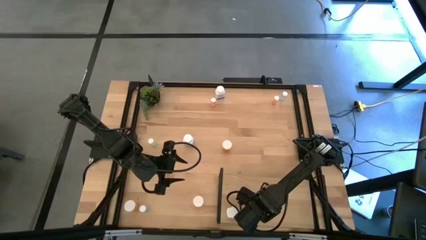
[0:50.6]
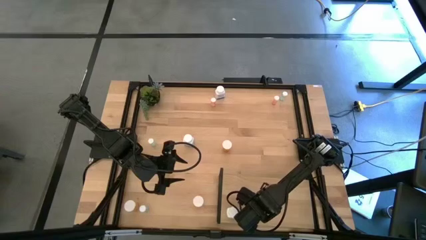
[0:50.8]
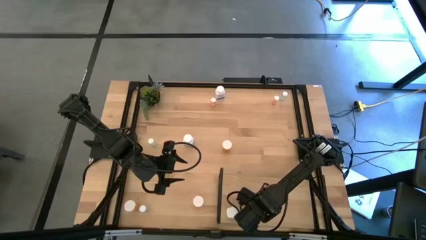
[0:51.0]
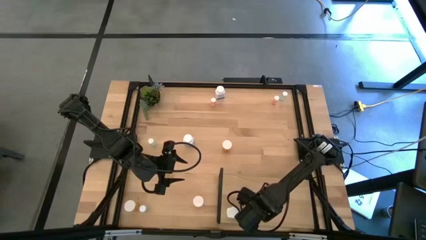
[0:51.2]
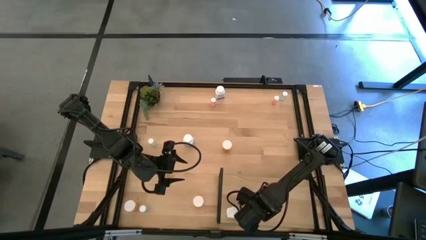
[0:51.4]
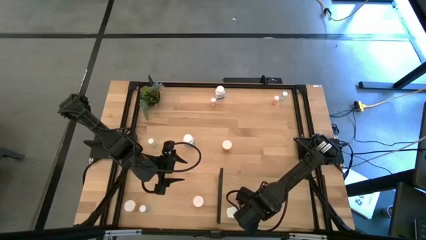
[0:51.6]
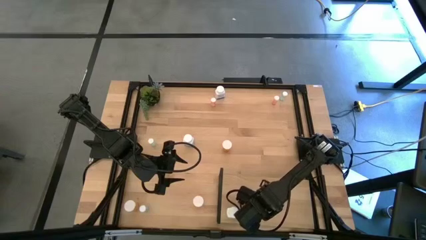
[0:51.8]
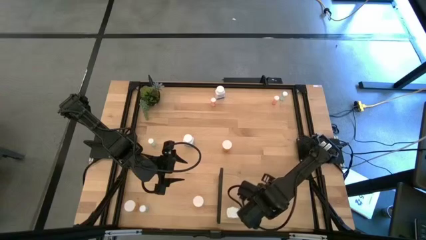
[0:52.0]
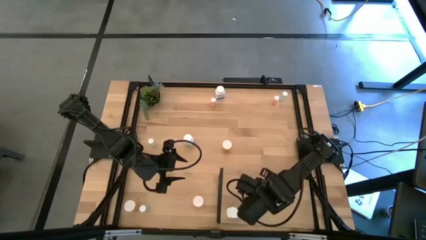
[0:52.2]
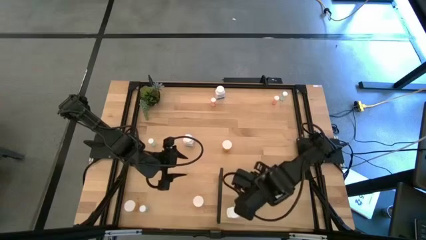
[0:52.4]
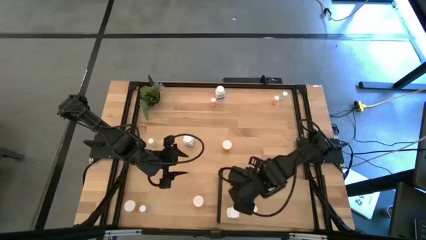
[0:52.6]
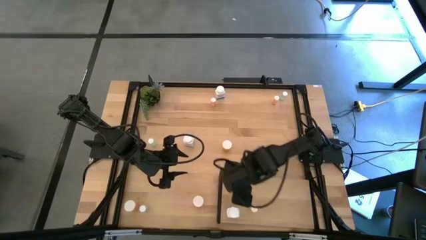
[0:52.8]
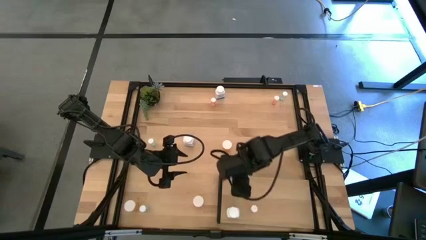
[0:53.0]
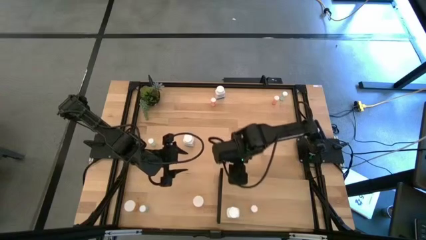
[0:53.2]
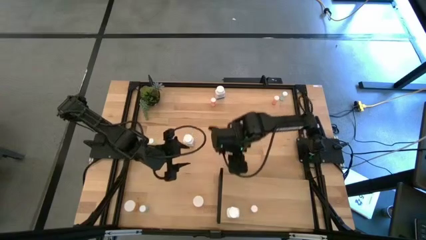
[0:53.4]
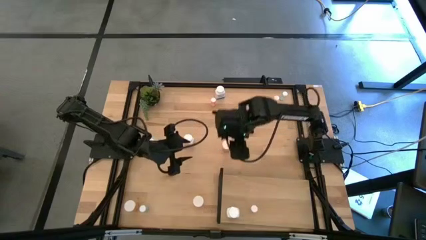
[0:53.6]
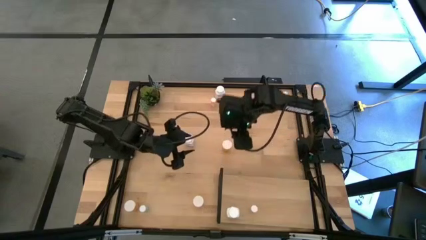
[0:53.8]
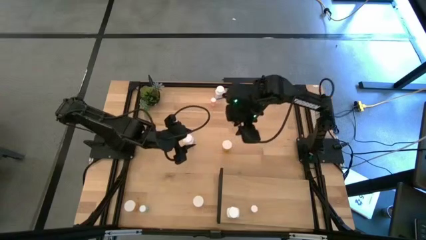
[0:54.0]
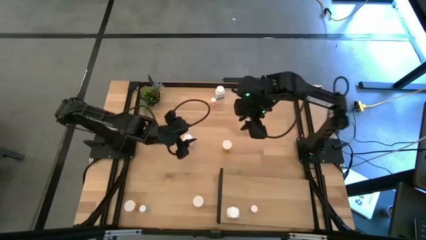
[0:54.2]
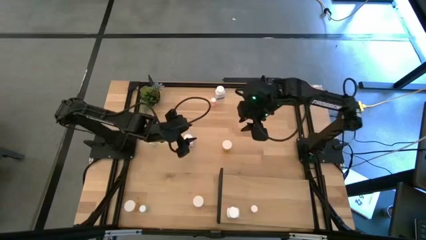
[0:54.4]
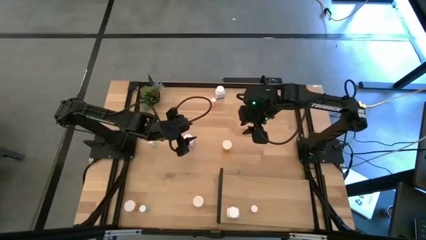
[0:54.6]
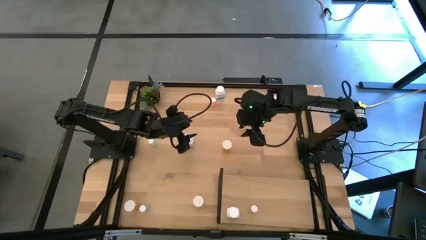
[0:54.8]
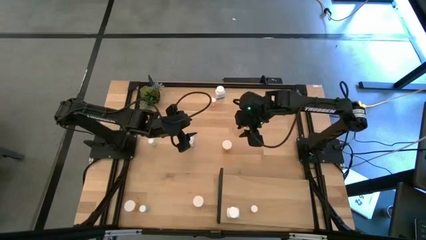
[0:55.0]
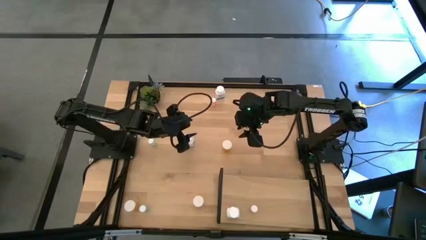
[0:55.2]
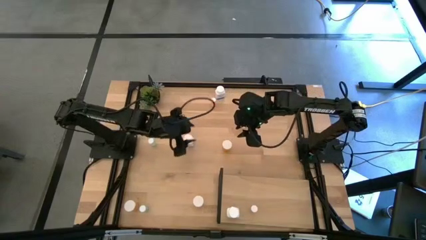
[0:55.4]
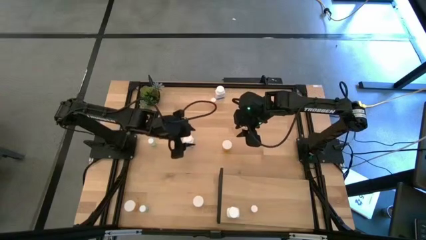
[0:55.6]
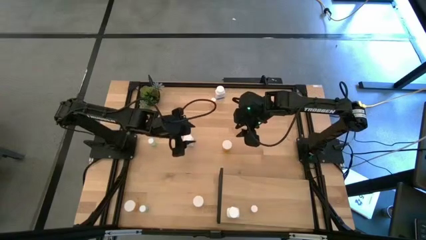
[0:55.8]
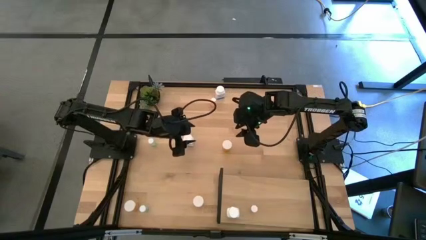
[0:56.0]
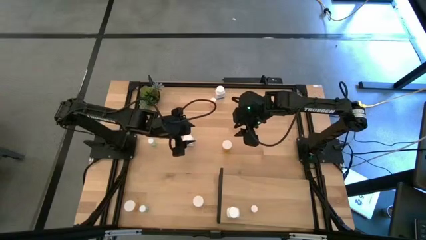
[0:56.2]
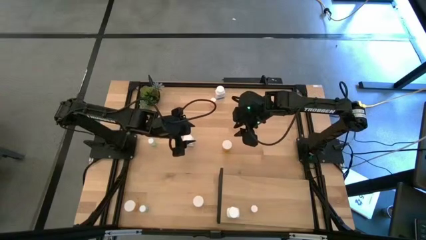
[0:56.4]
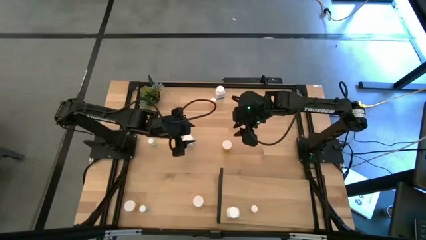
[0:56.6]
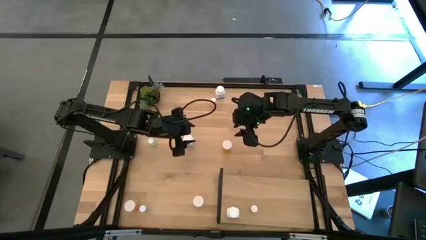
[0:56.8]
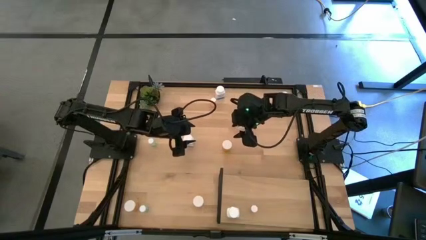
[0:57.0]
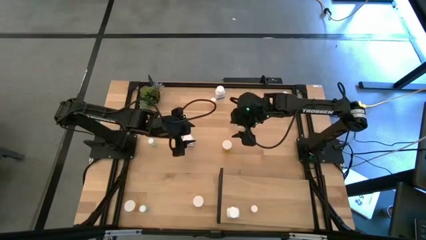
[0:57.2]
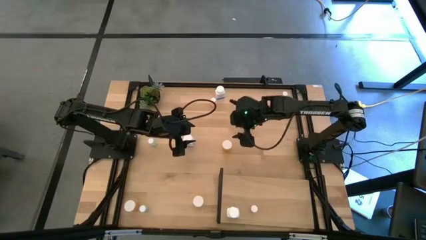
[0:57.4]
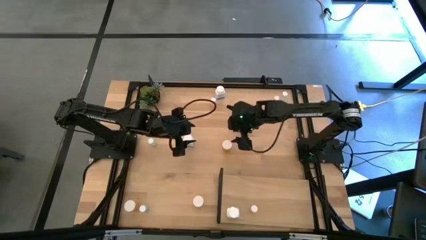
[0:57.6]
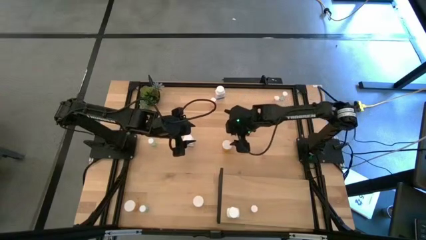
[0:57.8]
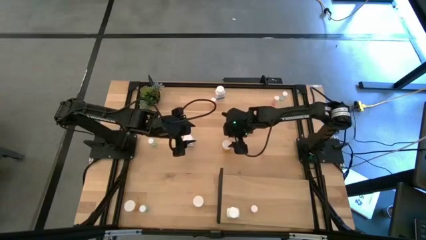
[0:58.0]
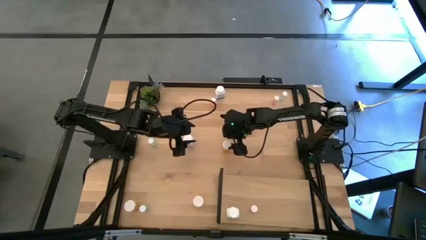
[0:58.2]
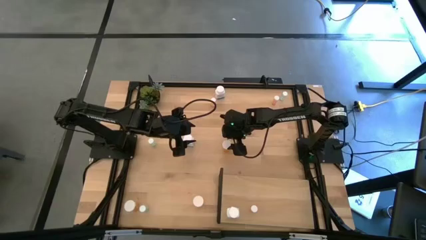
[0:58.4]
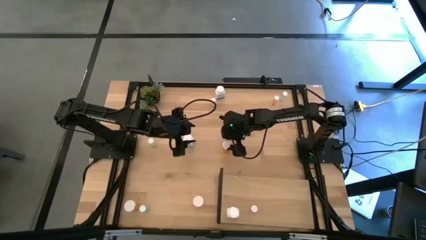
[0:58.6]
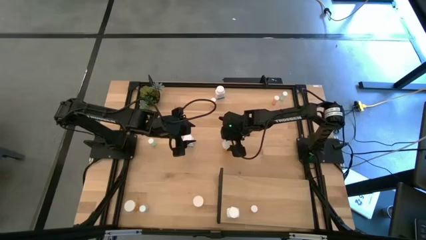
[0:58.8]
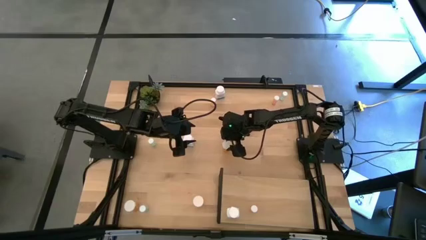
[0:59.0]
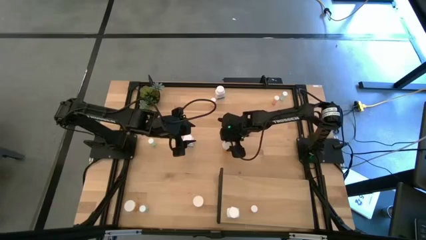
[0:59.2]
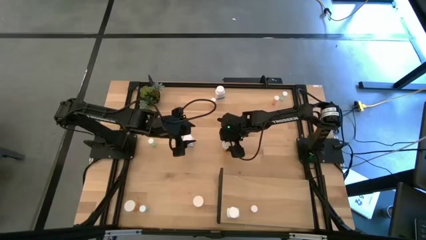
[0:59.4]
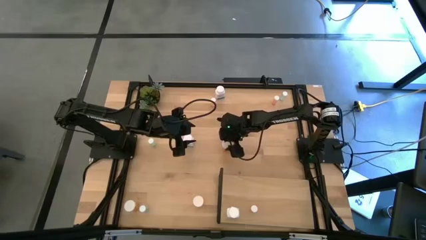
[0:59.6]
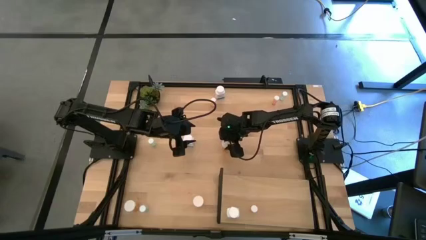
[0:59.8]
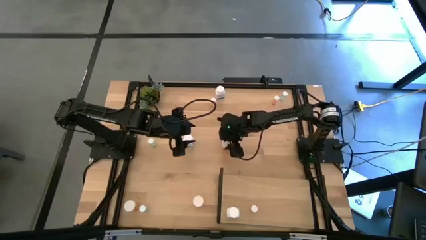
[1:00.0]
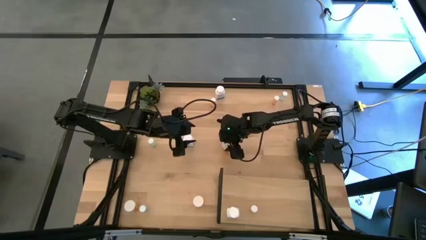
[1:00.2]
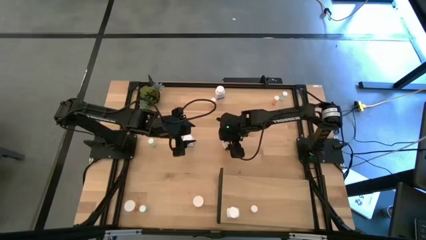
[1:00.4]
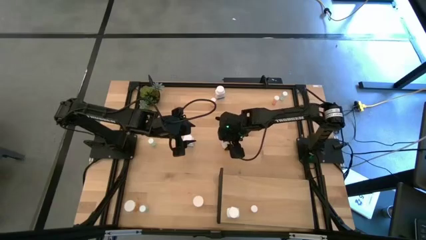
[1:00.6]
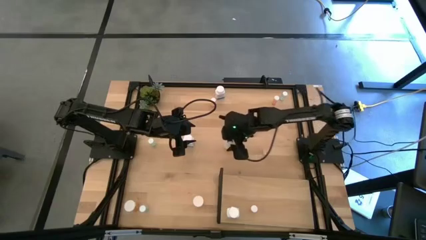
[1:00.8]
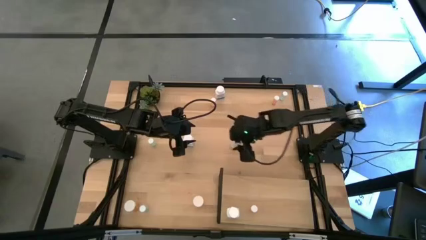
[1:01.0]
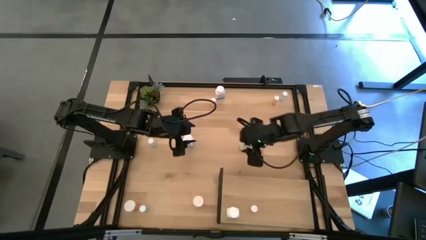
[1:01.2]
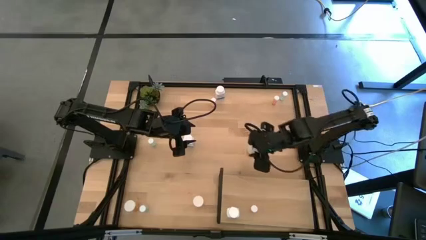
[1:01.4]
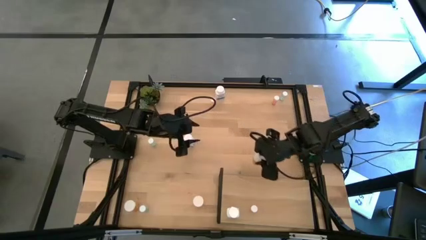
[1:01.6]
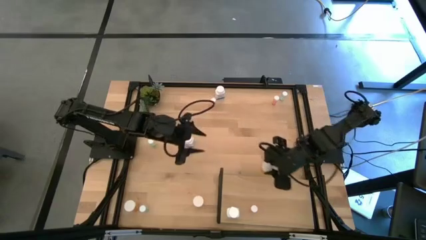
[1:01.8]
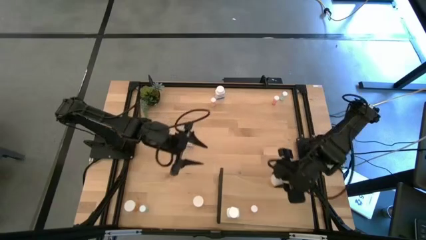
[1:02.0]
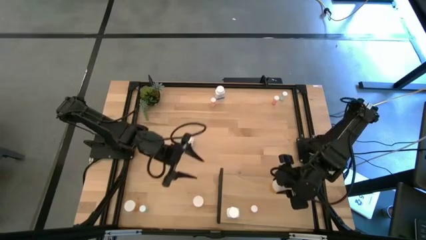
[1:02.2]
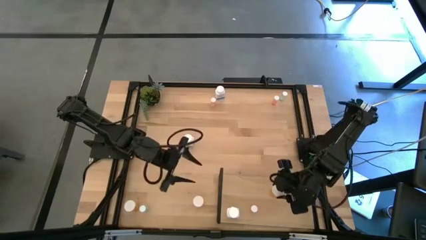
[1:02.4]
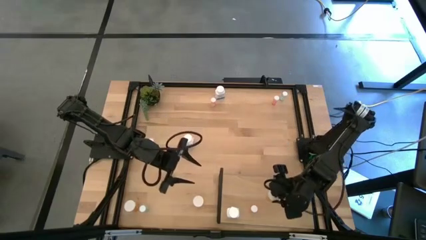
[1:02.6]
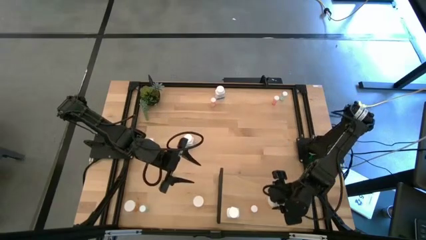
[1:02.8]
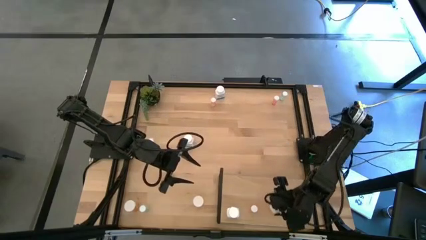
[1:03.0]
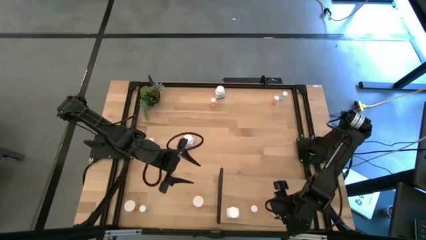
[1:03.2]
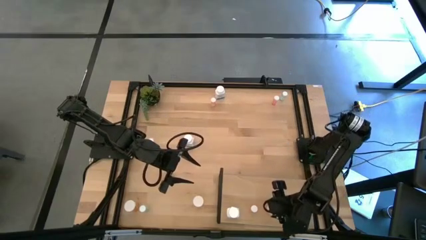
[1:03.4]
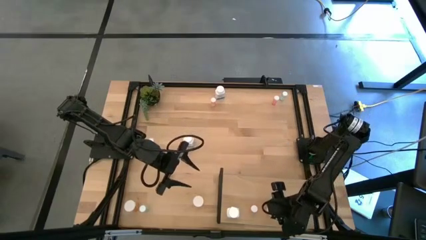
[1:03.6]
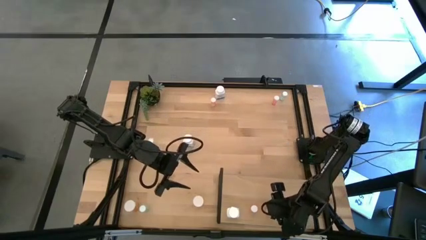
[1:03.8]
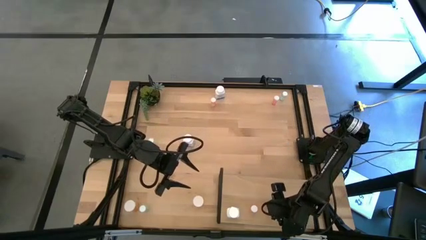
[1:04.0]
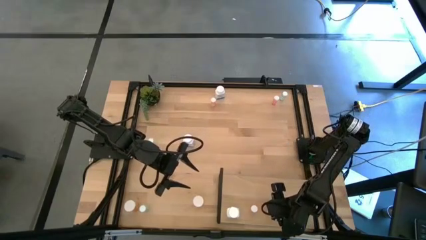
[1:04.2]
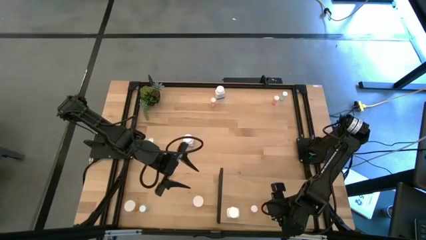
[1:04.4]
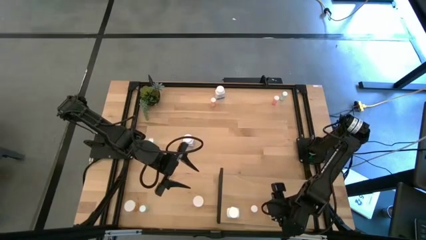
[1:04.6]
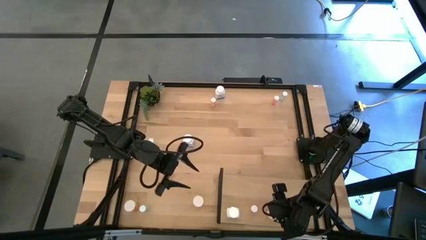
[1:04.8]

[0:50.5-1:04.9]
Task: Pick and place medicine bottles onto shelf by color
Put the middle orange pill bottle on the shelf
